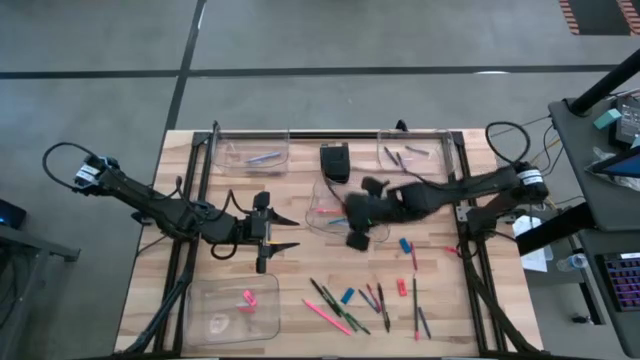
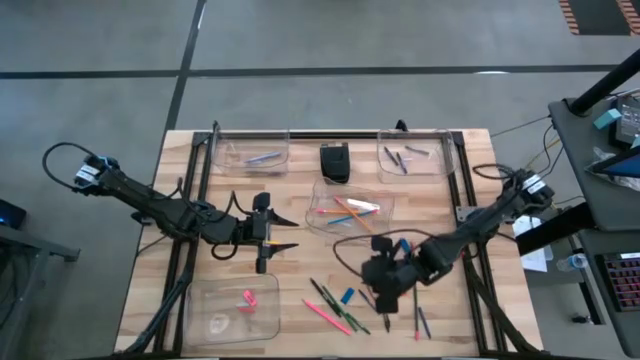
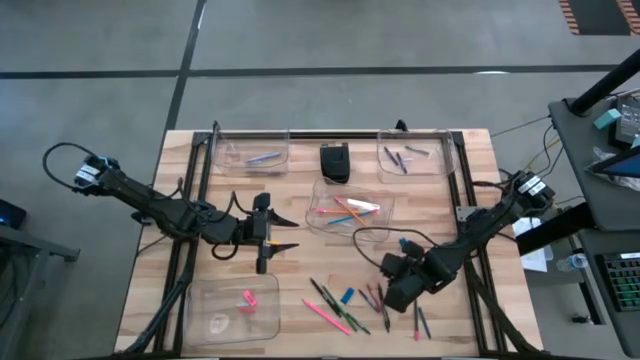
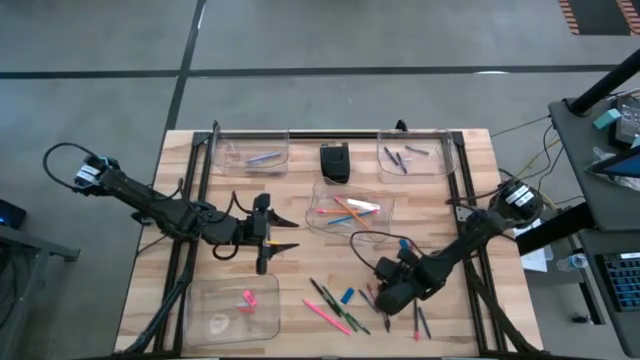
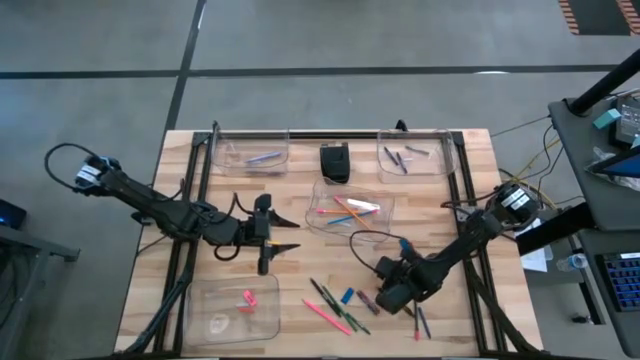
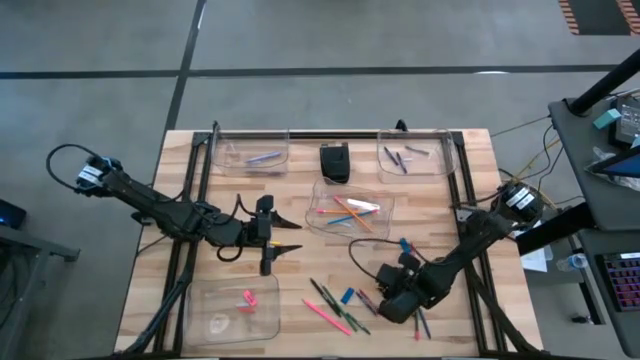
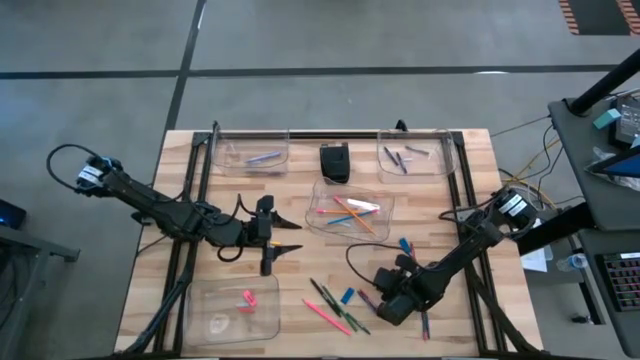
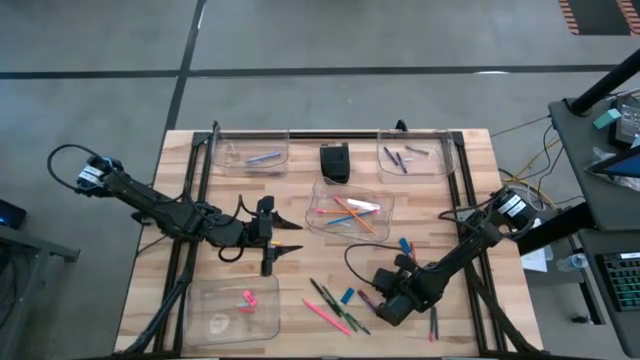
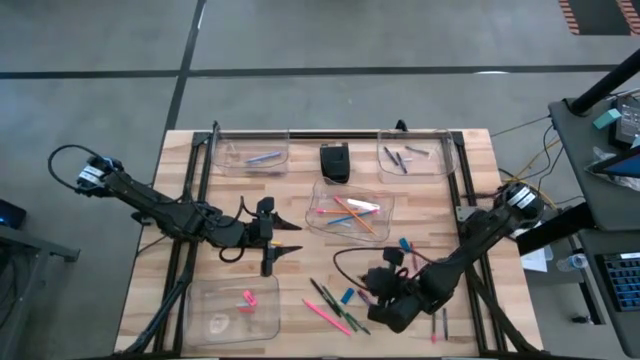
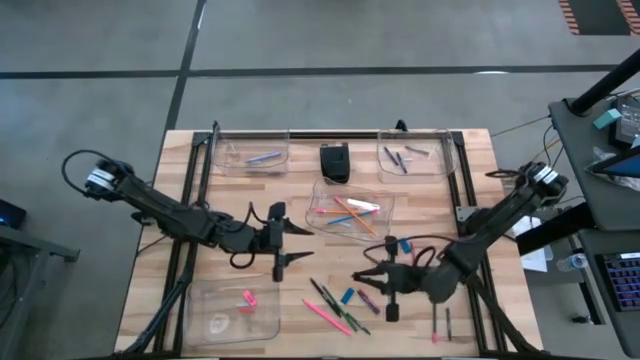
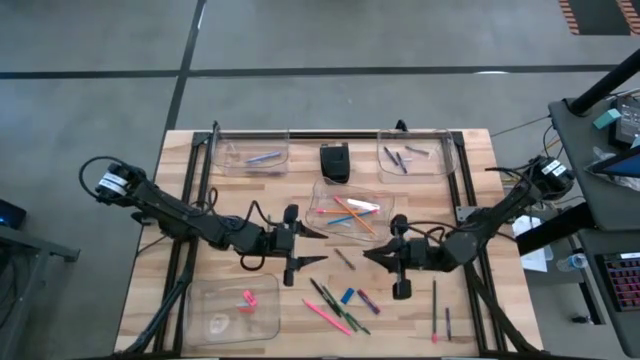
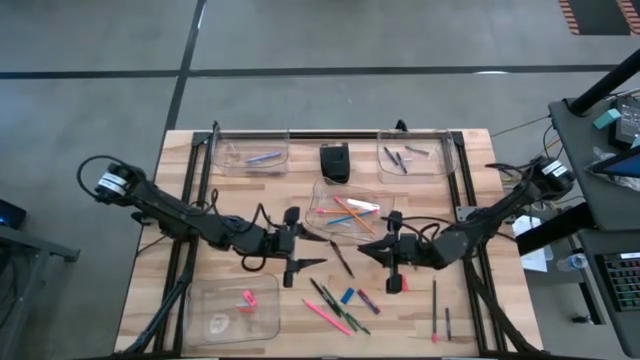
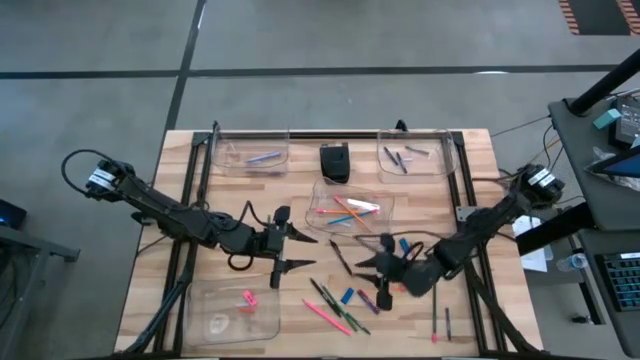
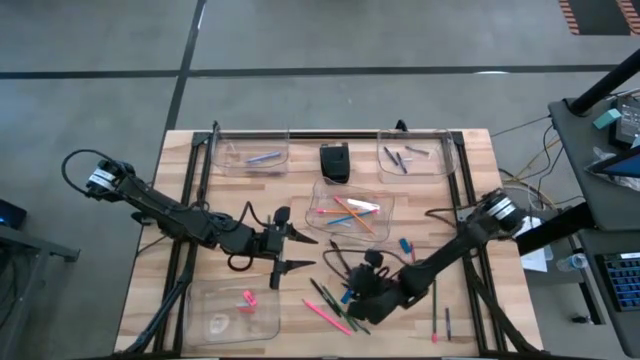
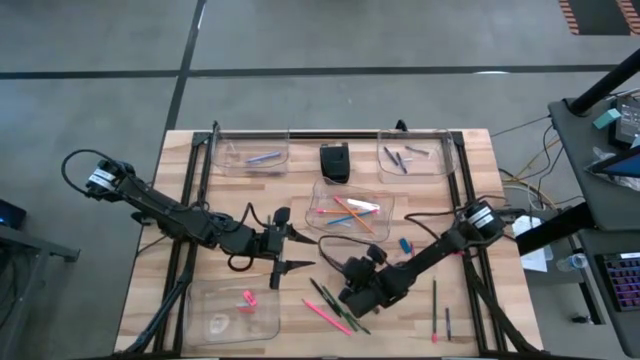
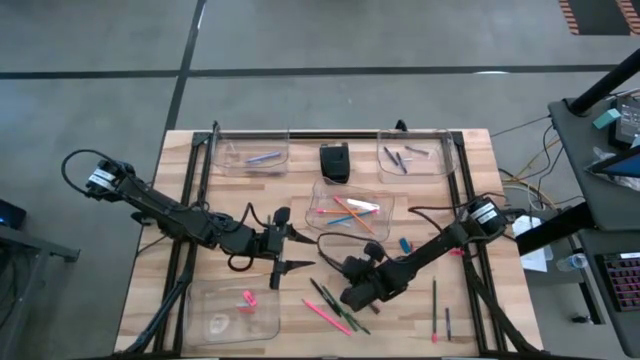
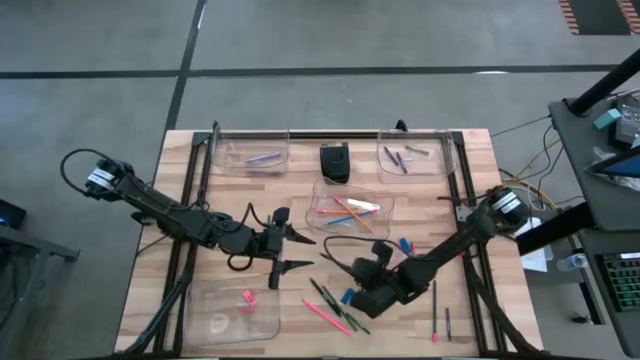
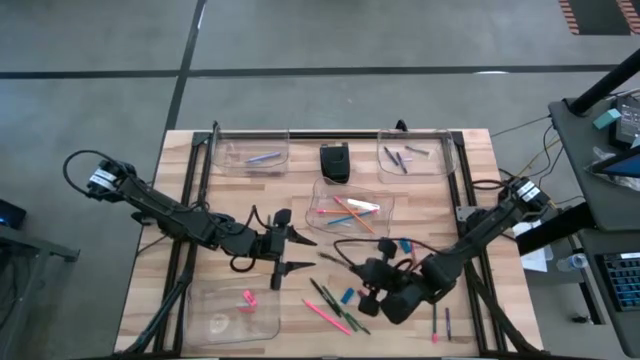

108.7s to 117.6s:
Task: Sort crayons/erasers/pens/pencils in bins
Put the black pen into the top left transparent bin

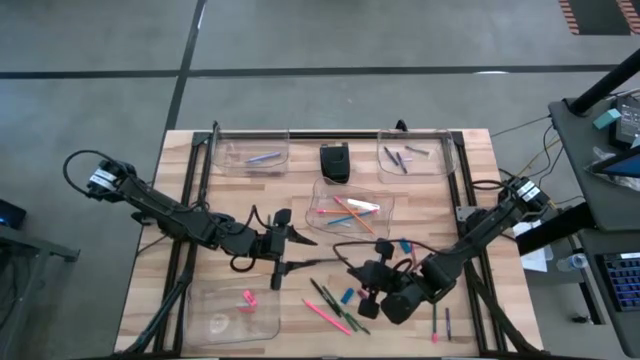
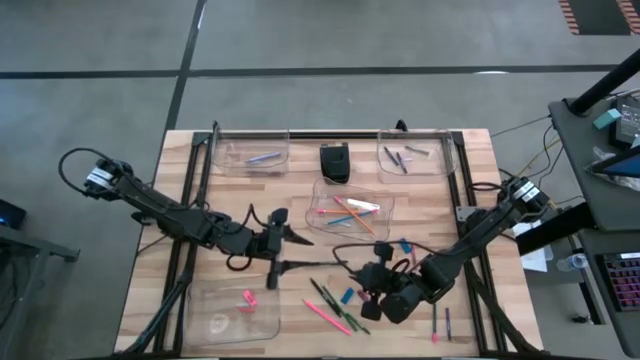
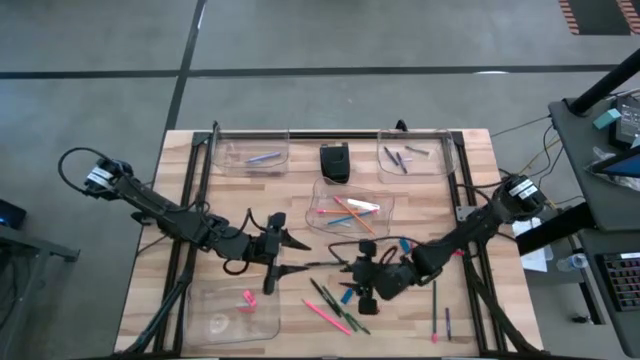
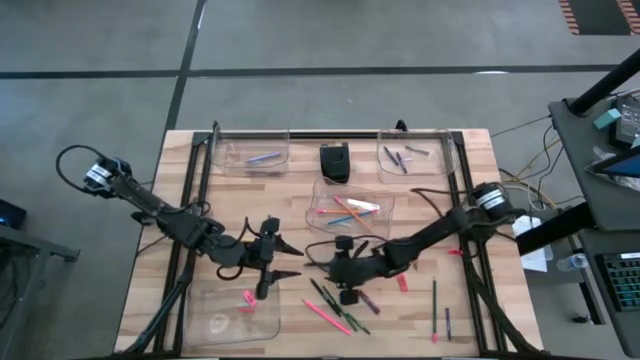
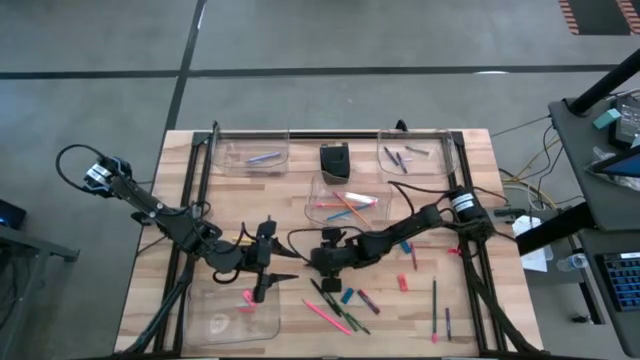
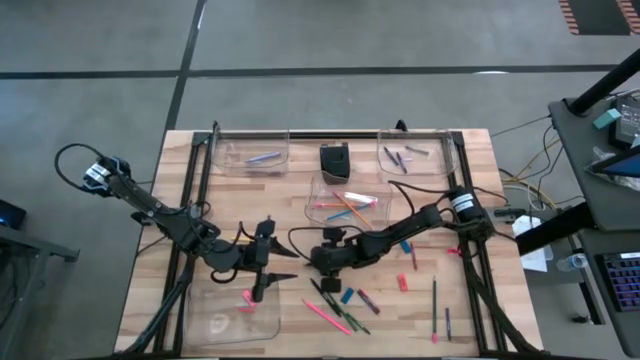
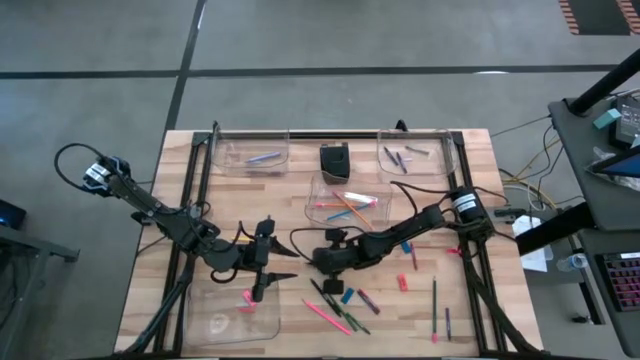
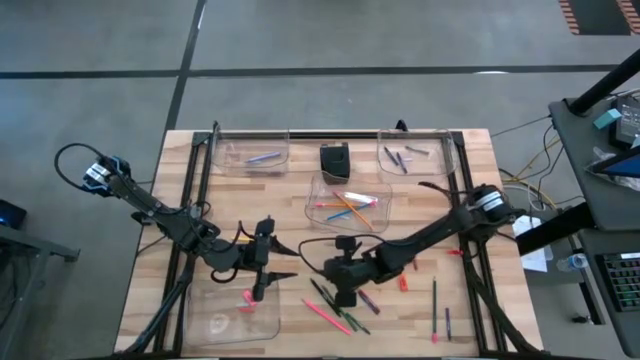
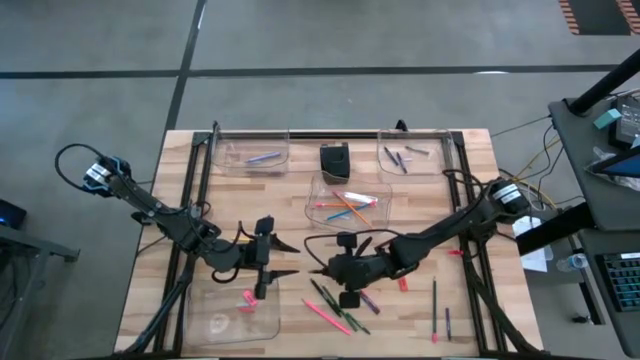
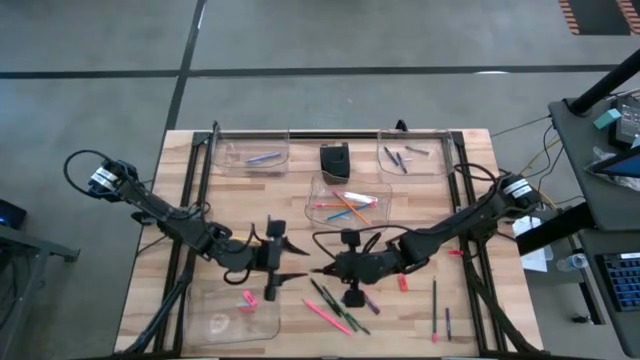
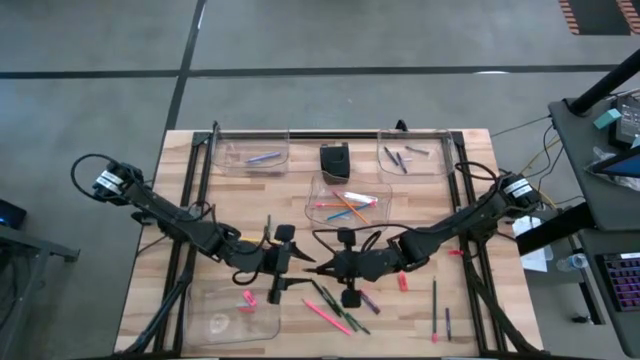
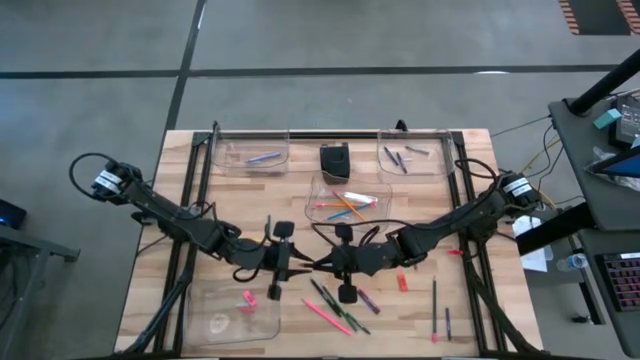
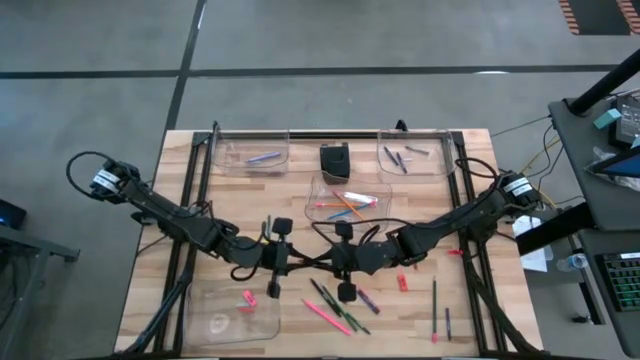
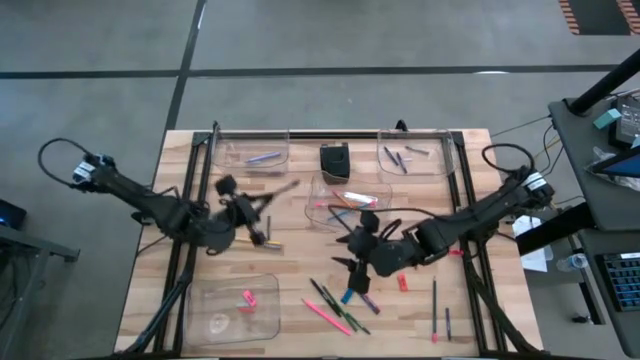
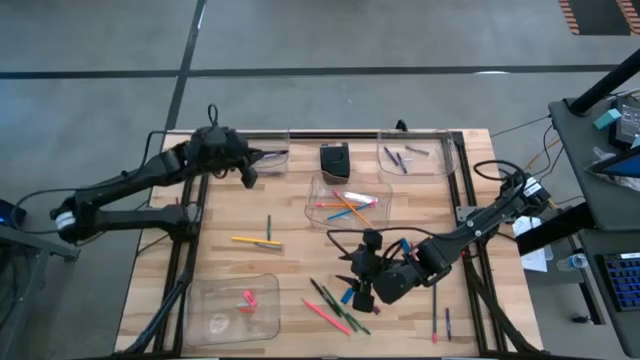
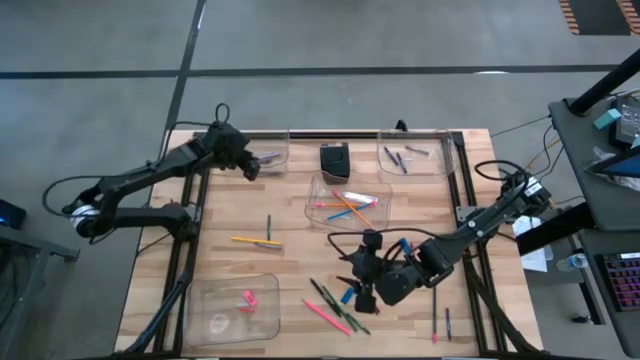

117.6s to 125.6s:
Put the black pen into the top left transparent bin

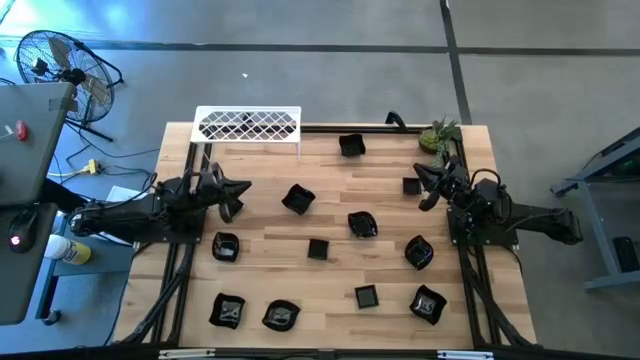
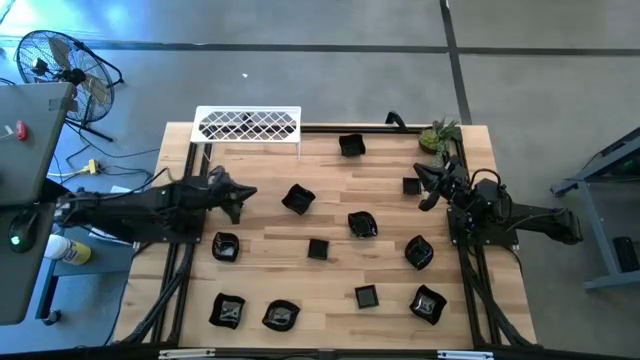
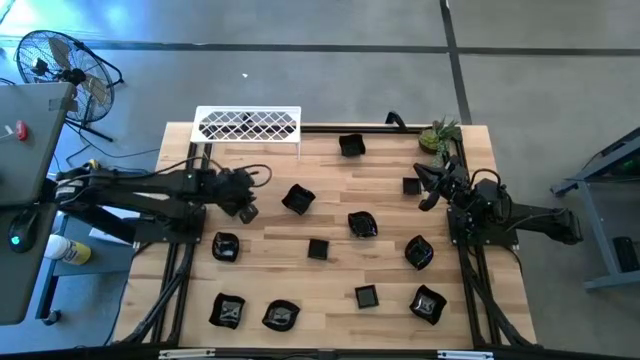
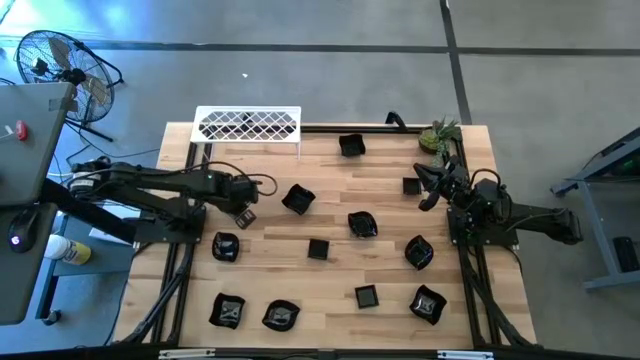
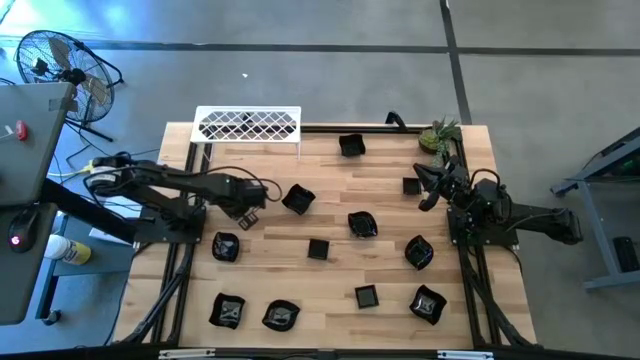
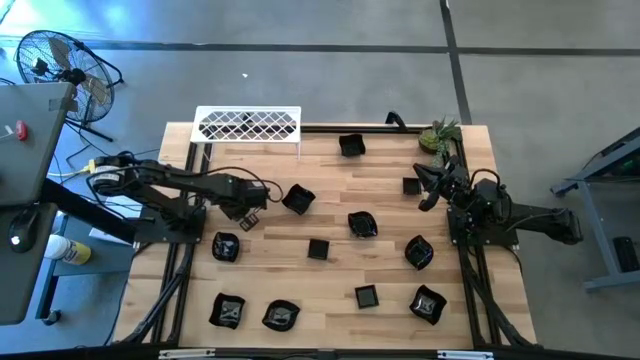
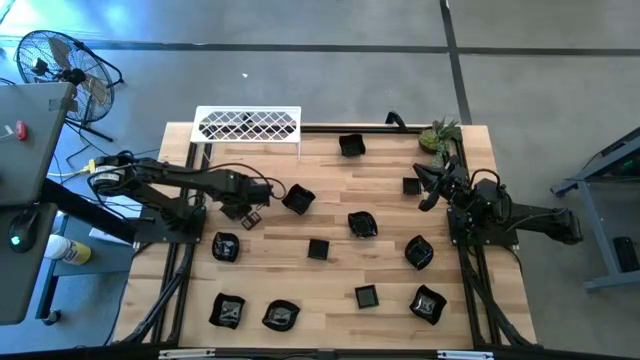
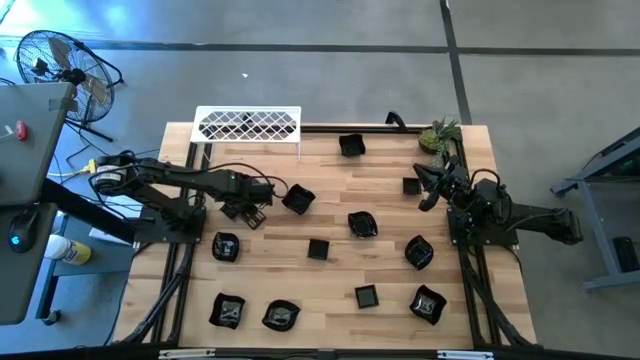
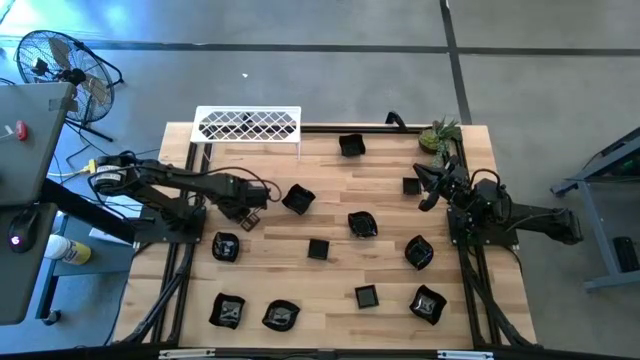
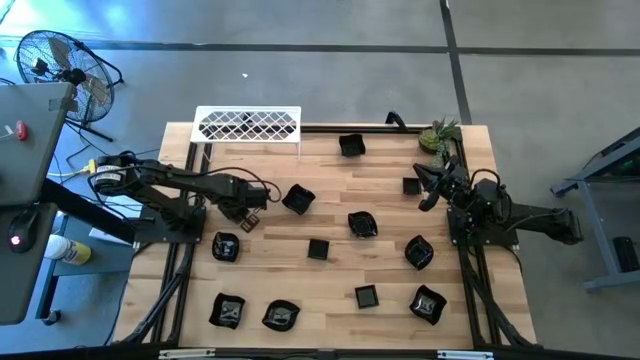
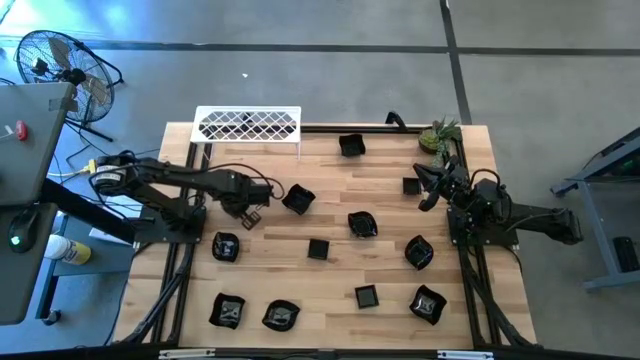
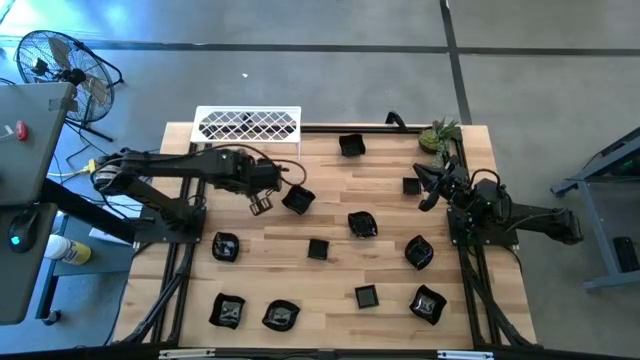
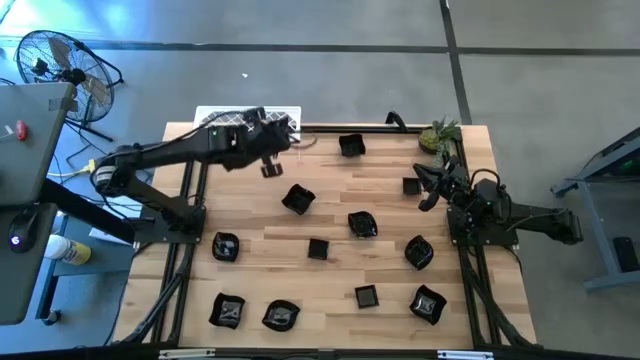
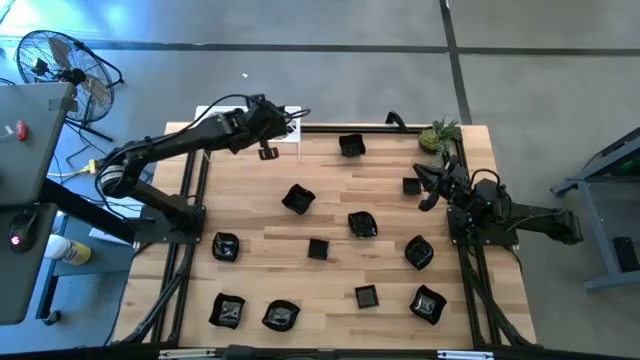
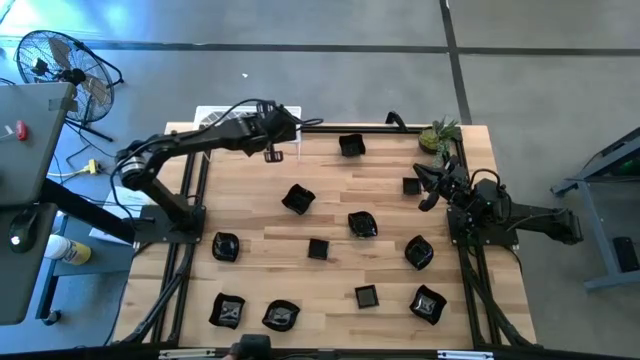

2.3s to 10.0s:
Task: Pick & Place Mini shaped plates
Put the black square plate on the shelf
